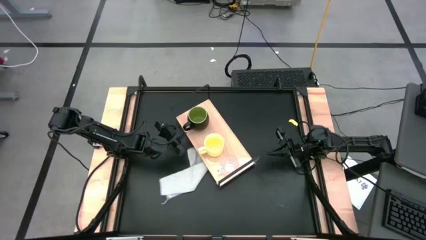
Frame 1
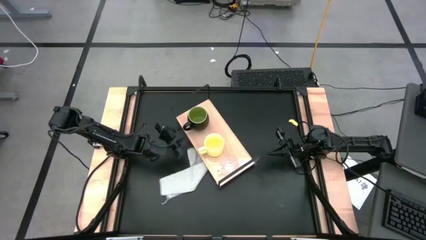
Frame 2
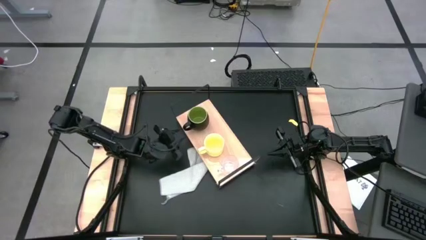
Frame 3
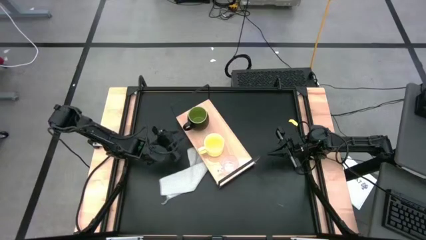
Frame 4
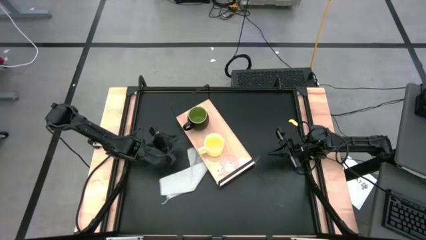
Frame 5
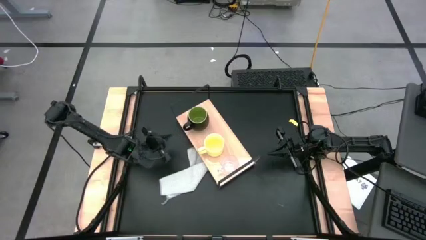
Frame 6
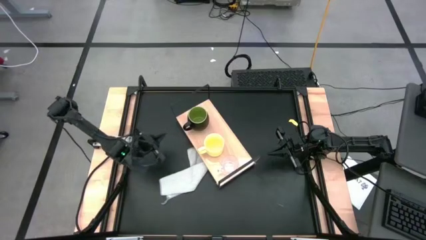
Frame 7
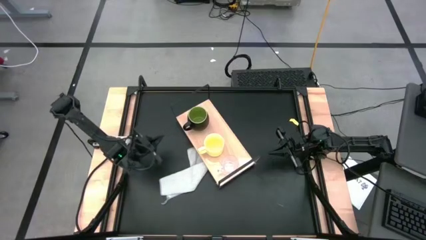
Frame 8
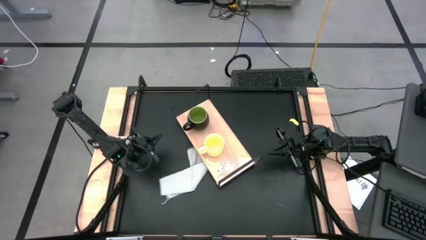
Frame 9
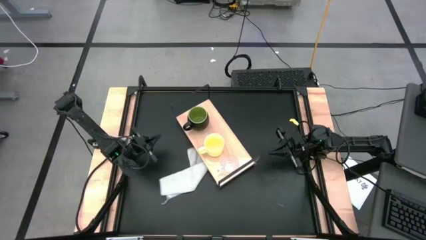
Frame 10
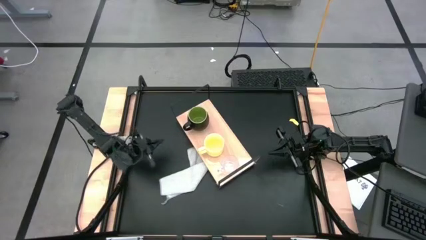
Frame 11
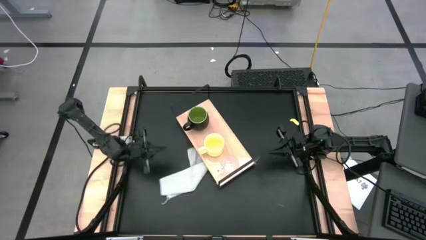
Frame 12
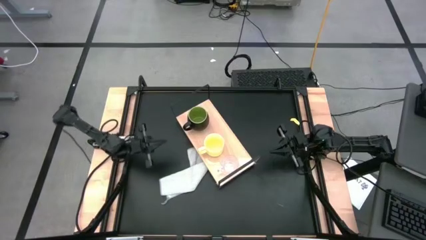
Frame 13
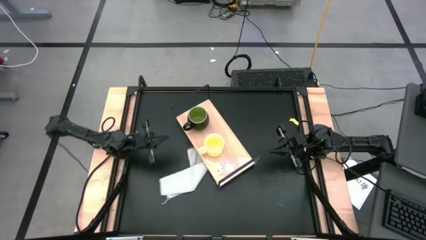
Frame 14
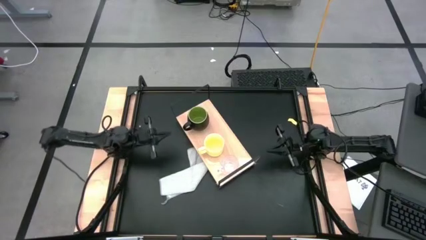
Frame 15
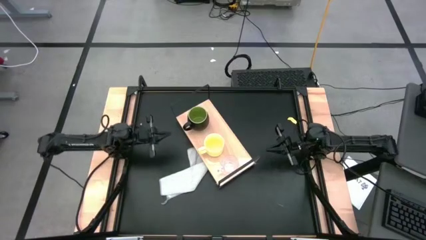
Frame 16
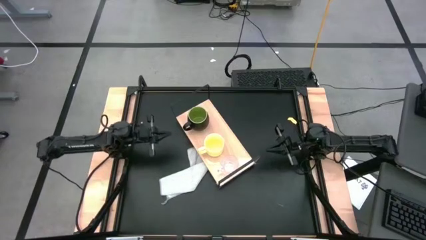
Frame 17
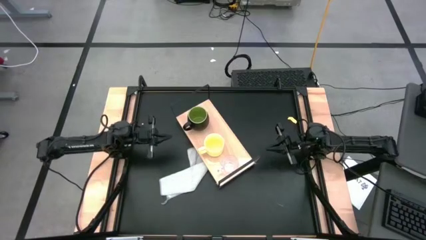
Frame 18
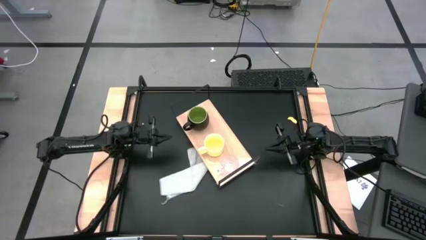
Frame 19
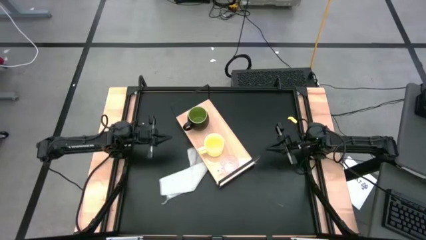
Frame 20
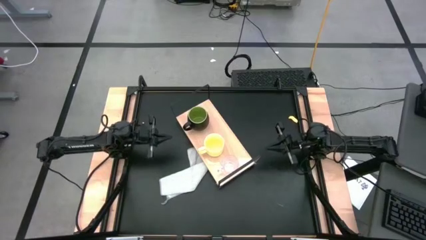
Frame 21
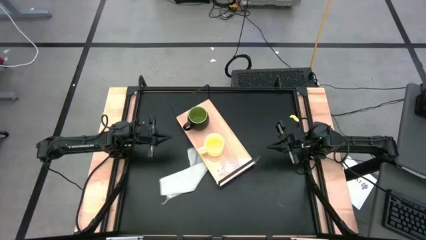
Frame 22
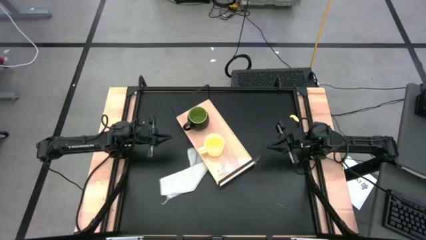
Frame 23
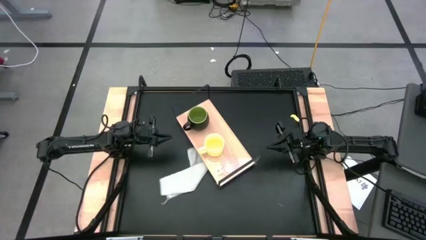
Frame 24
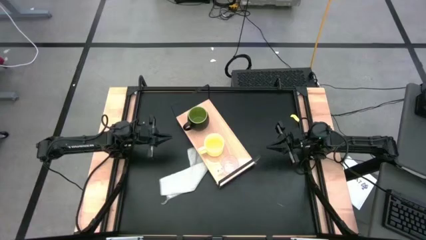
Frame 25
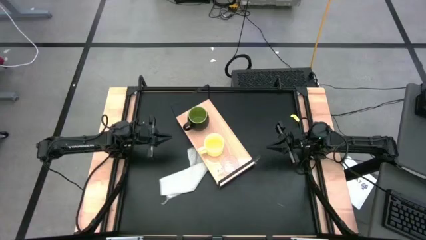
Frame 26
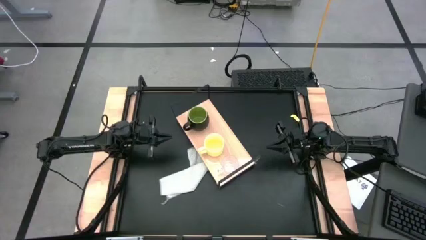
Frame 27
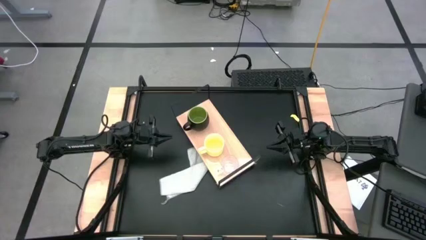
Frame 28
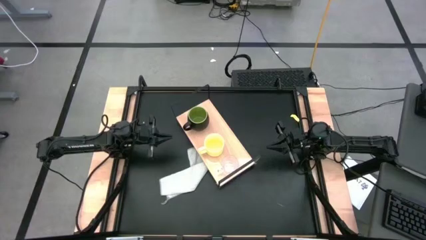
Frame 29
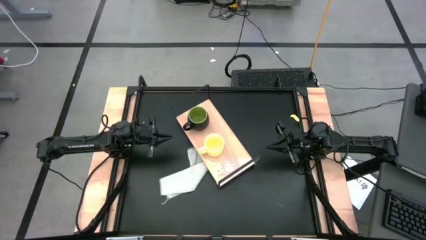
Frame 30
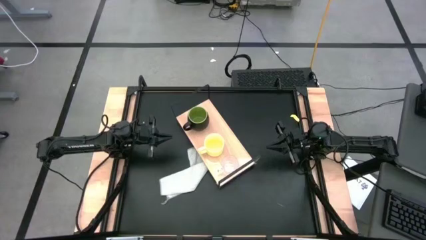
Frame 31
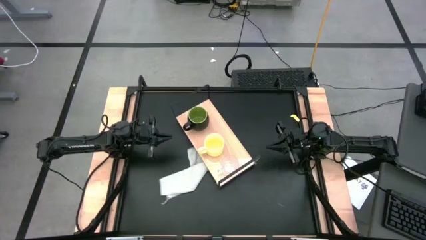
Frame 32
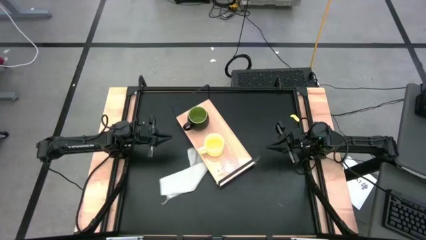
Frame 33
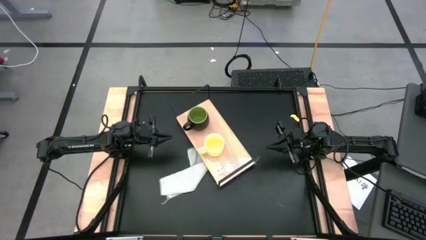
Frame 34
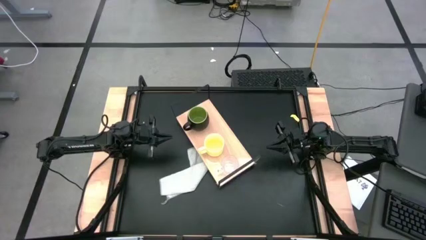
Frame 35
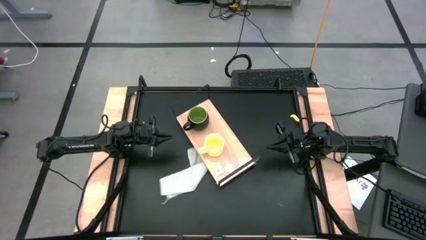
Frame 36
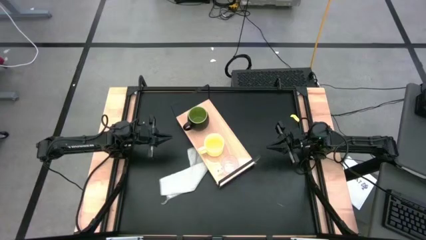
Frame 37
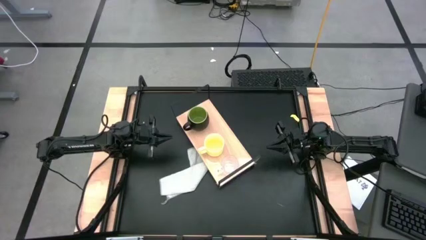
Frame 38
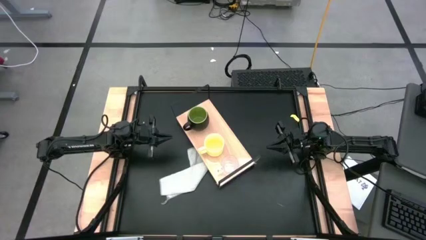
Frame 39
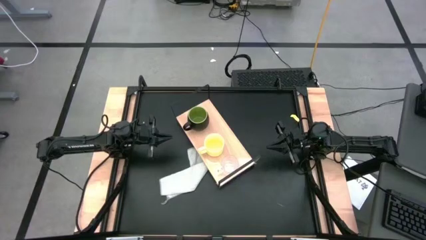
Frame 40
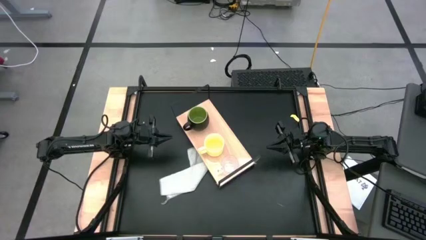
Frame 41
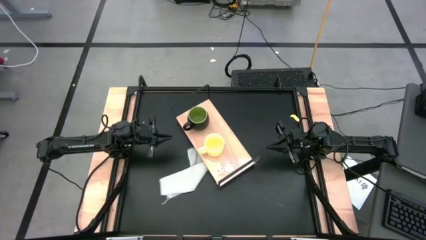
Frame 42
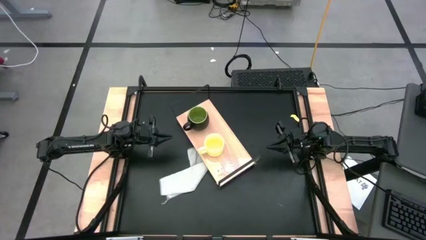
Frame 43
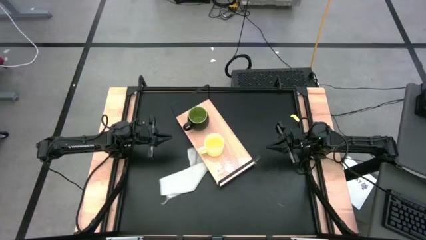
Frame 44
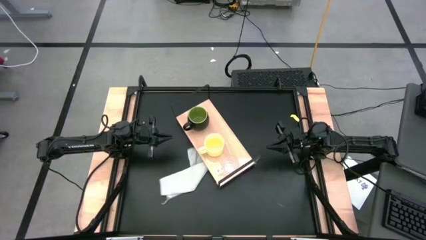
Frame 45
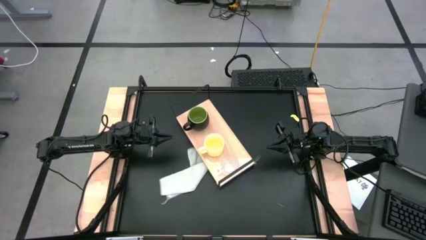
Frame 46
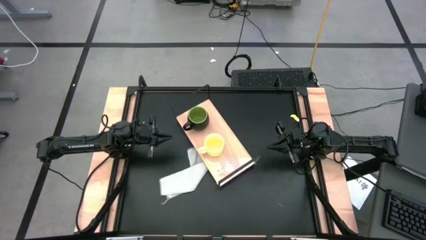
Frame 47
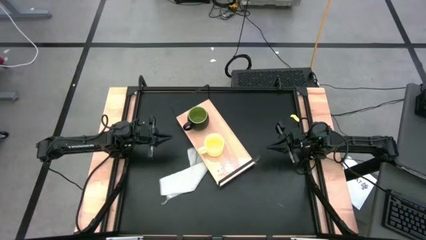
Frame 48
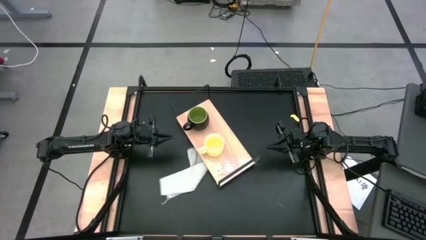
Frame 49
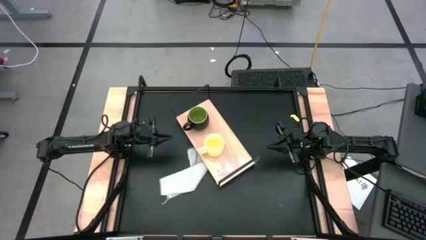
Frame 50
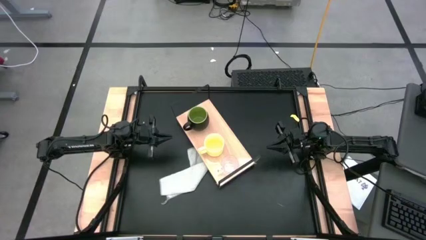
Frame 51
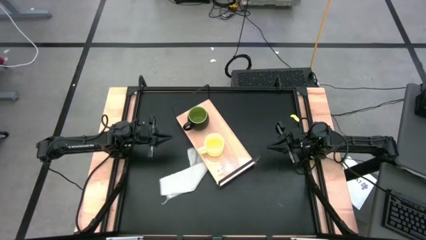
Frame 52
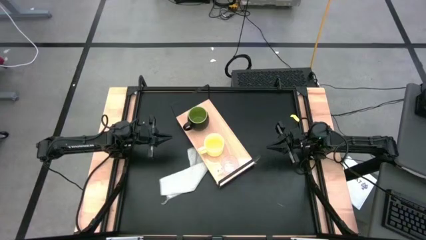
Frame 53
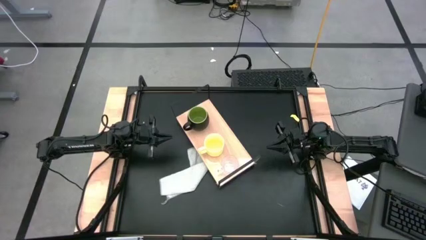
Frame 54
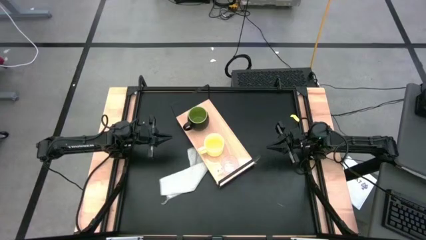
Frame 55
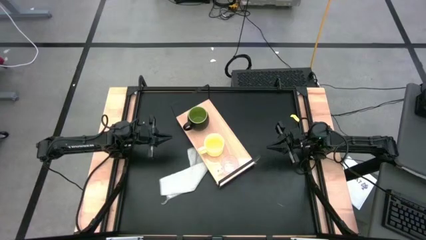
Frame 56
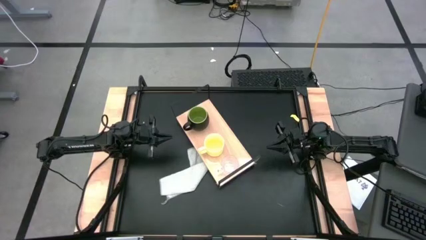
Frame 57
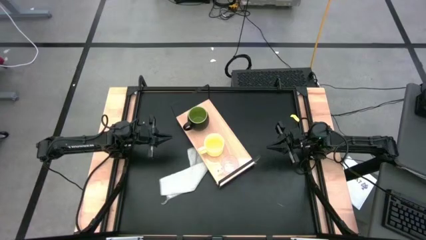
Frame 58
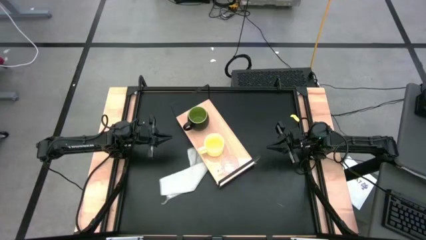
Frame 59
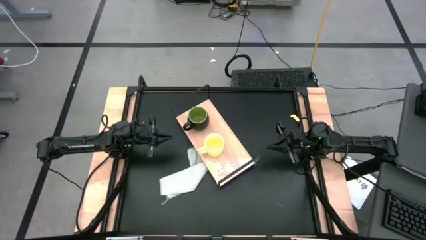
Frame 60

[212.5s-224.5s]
Task: Stack small to large cups/mugs on shelf
Return to Home Position

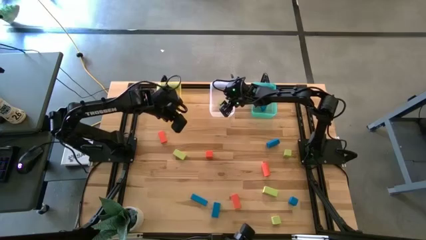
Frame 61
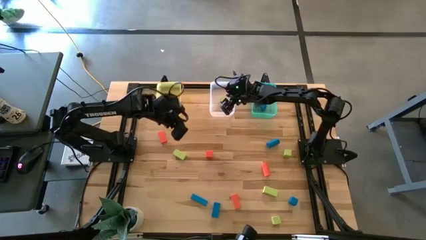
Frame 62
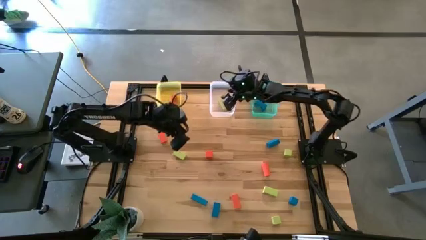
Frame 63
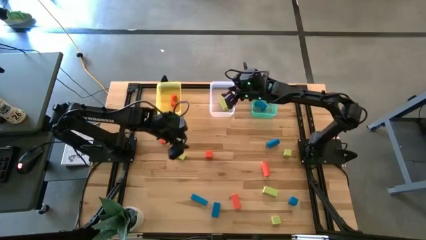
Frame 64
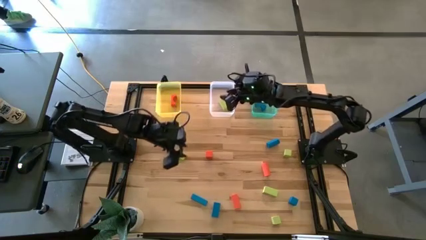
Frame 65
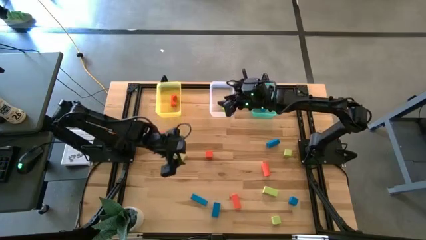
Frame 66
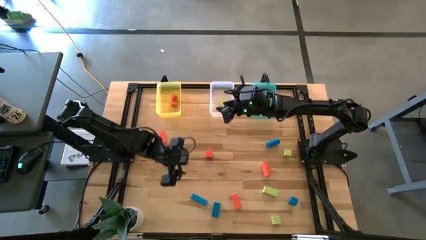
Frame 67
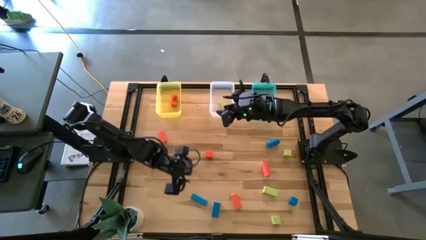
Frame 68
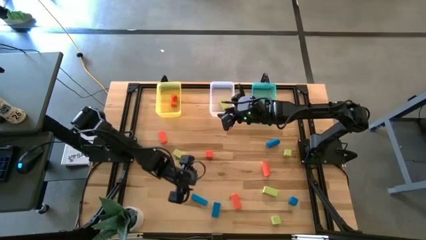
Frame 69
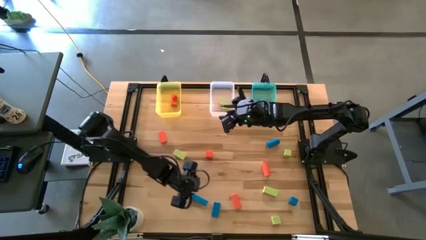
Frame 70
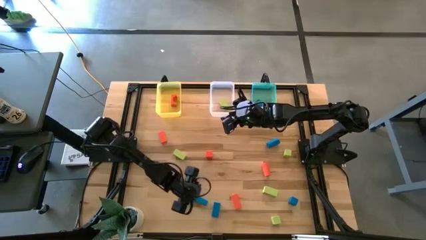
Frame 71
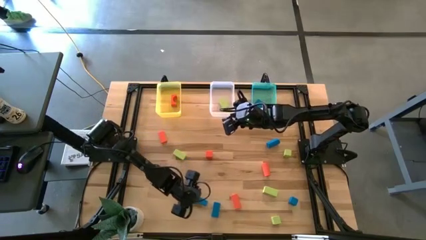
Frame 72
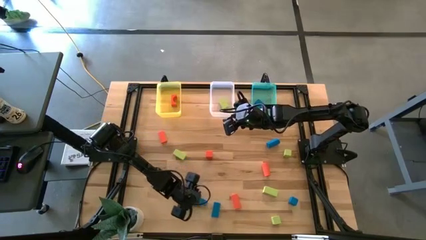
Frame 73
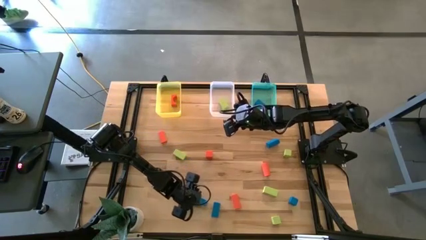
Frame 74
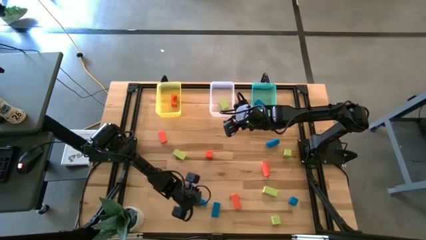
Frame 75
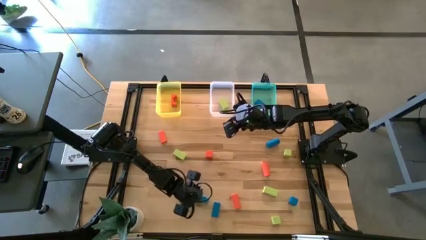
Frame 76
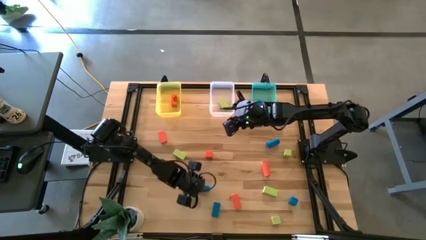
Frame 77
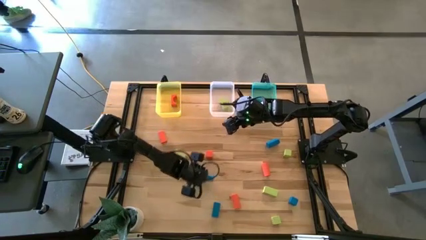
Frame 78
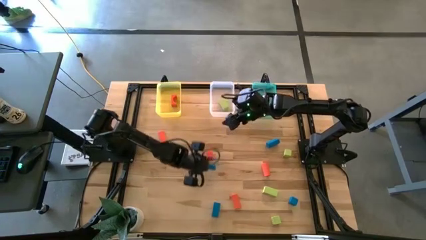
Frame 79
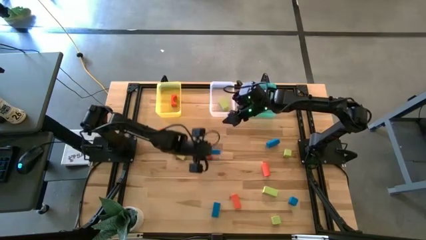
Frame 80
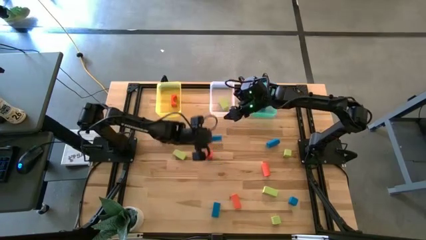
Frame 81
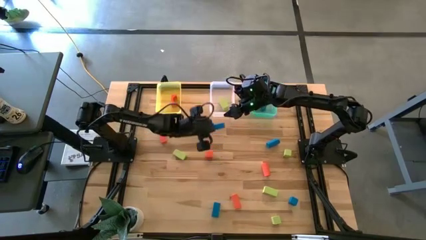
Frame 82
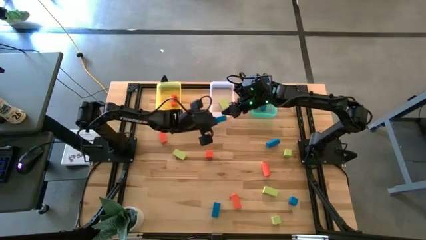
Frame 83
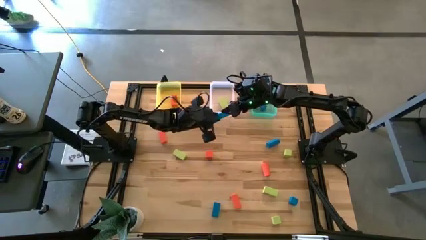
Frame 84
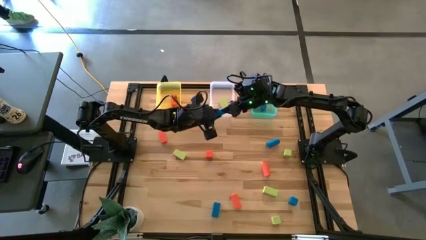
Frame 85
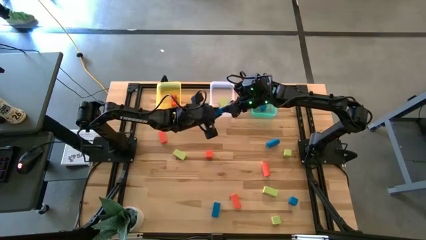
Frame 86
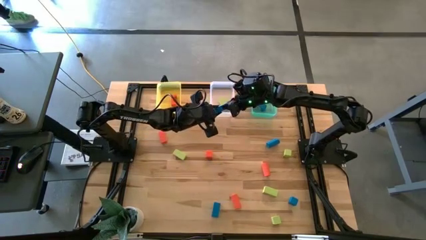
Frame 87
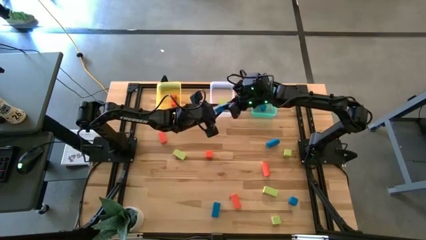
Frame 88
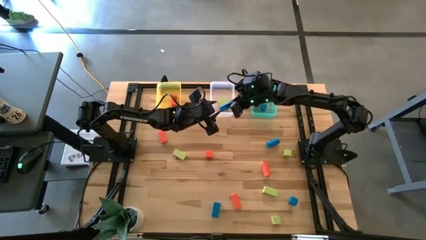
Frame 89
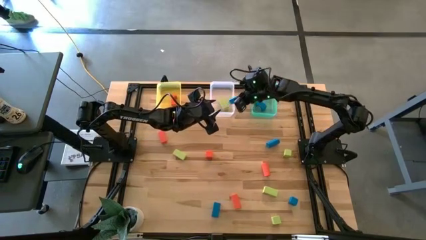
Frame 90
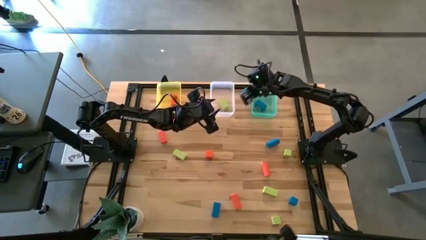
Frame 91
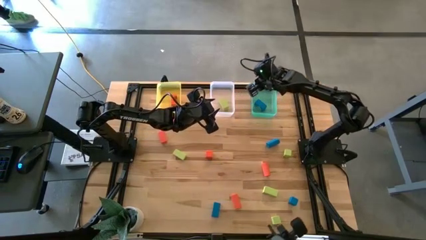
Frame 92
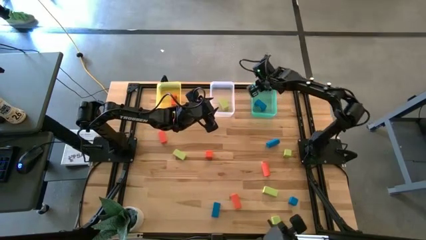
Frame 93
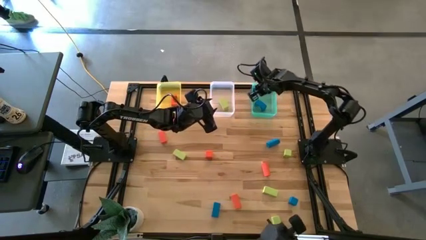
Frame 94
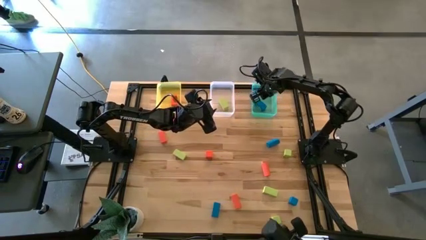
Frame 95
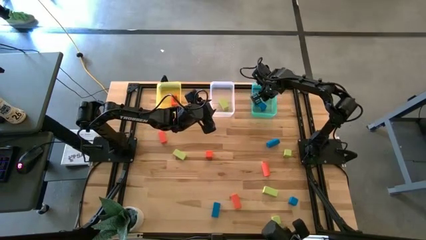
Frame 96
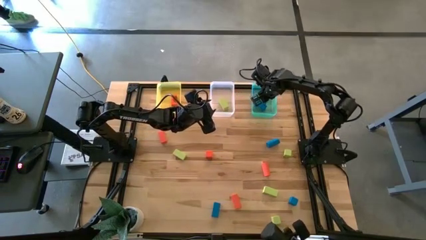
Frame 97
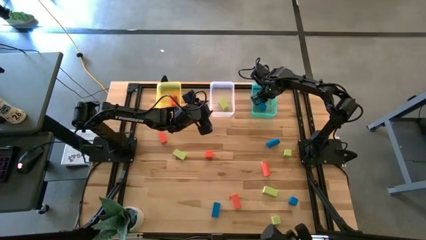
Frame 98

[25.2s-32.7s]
Task: Sort & place blocks by color
Put the blue block into the green bin
